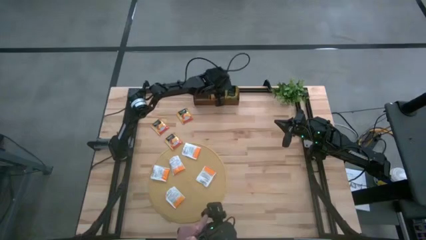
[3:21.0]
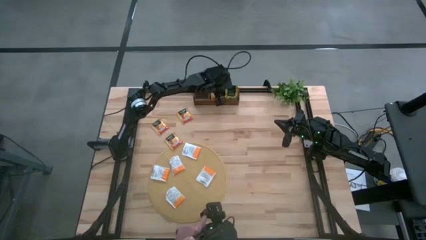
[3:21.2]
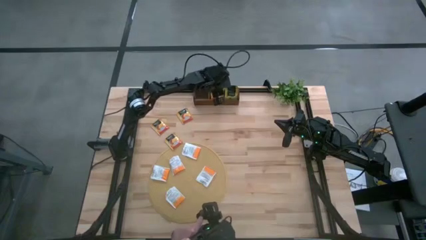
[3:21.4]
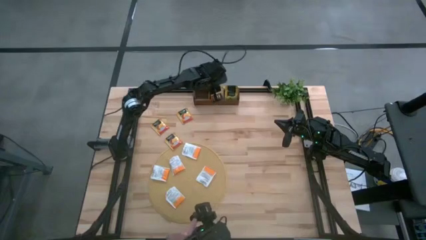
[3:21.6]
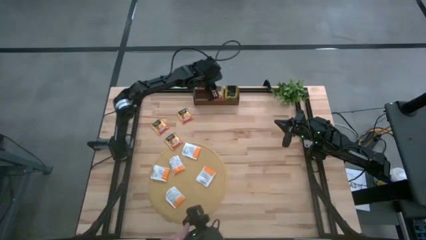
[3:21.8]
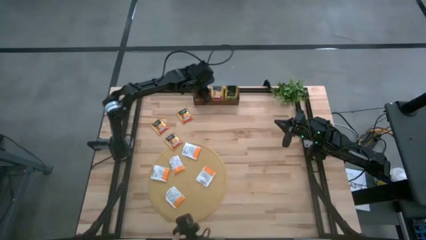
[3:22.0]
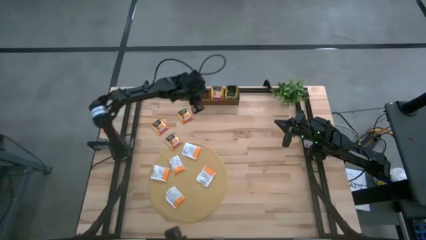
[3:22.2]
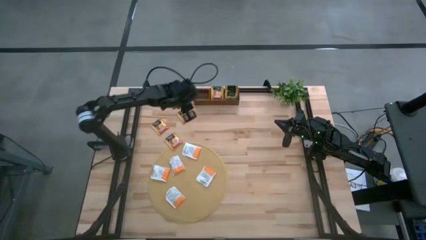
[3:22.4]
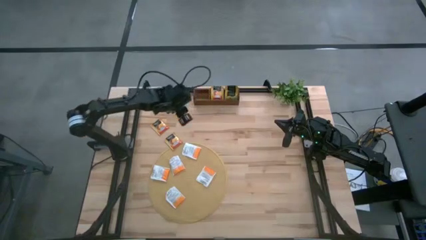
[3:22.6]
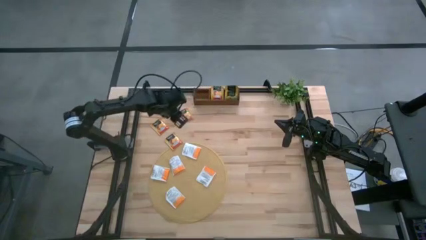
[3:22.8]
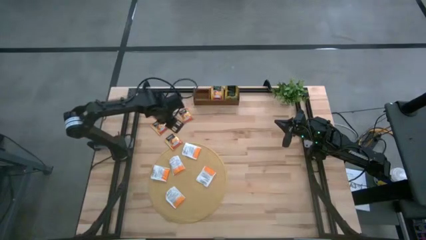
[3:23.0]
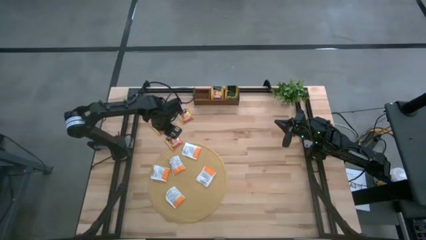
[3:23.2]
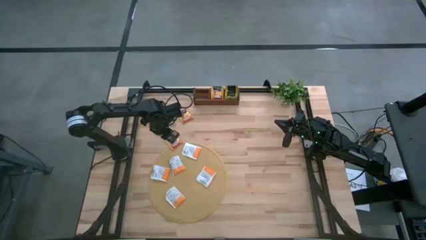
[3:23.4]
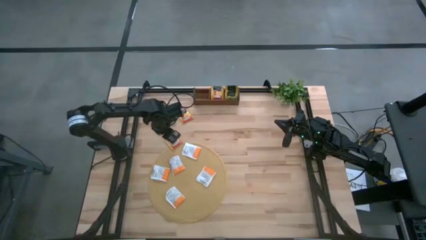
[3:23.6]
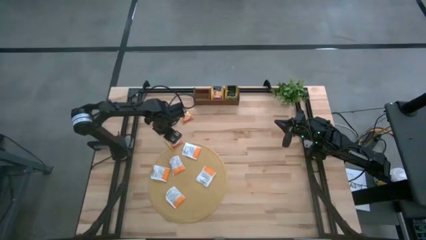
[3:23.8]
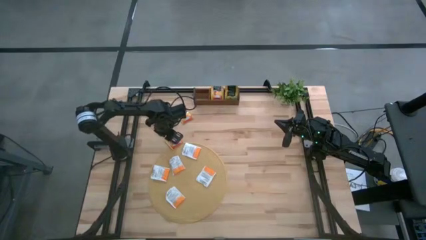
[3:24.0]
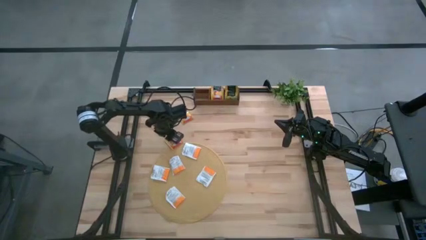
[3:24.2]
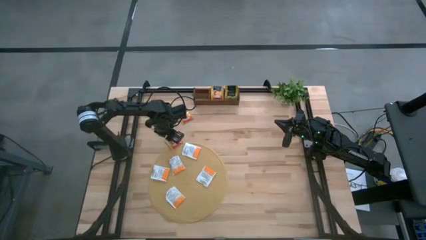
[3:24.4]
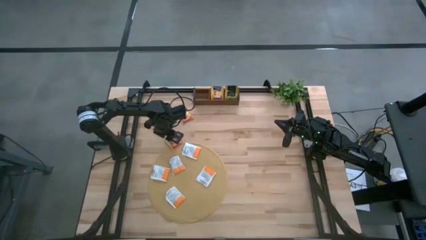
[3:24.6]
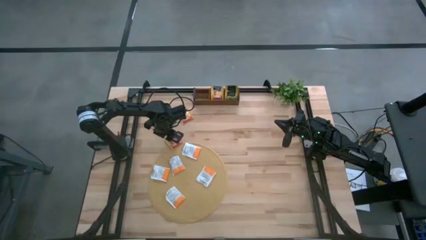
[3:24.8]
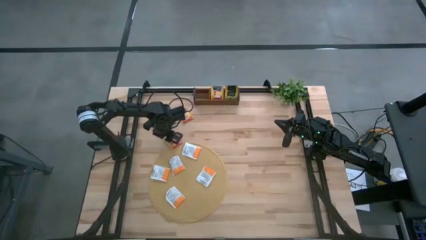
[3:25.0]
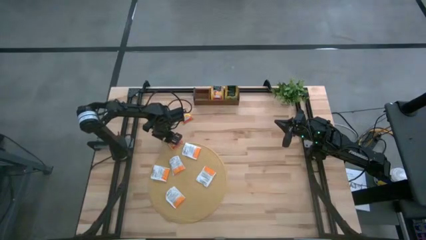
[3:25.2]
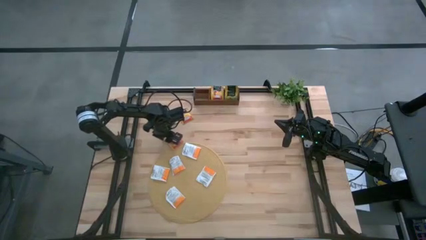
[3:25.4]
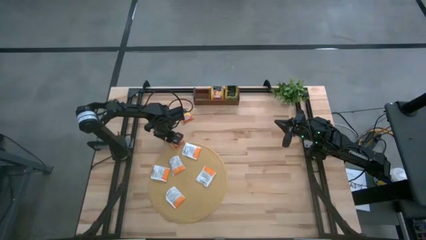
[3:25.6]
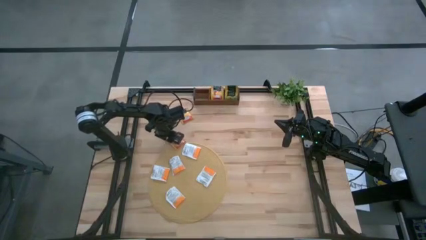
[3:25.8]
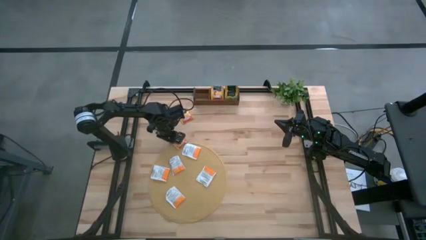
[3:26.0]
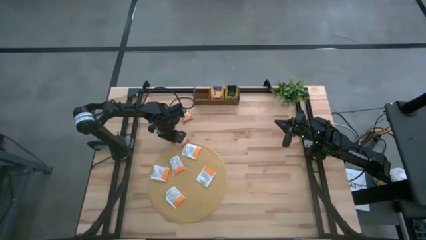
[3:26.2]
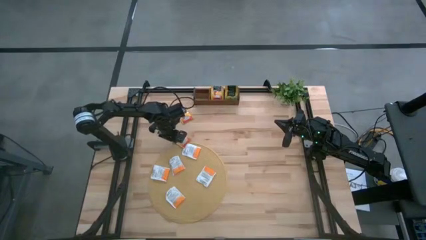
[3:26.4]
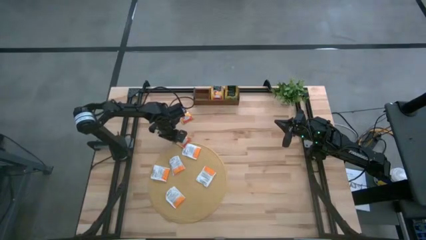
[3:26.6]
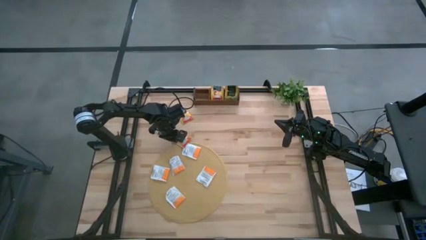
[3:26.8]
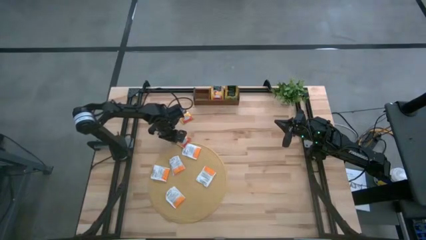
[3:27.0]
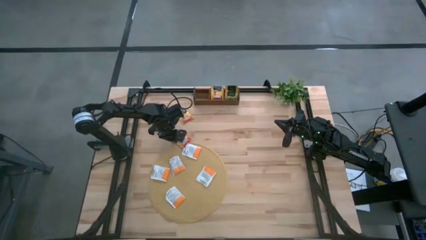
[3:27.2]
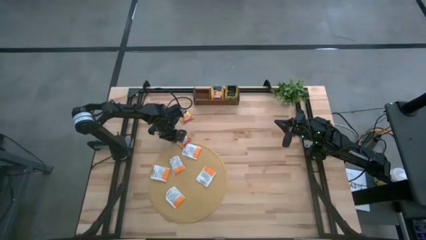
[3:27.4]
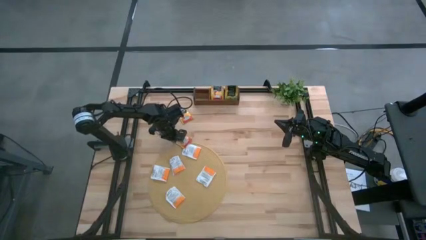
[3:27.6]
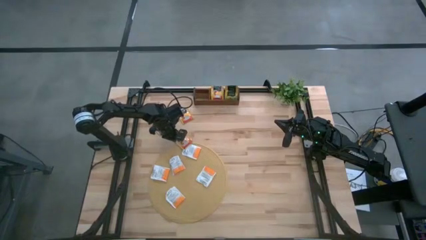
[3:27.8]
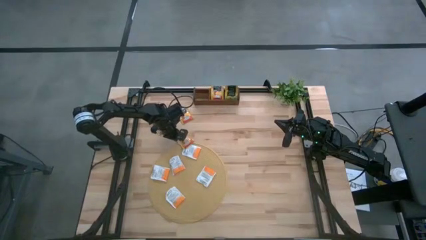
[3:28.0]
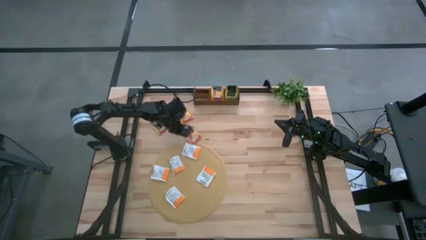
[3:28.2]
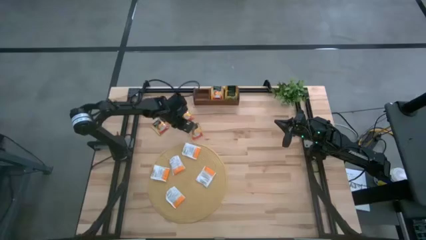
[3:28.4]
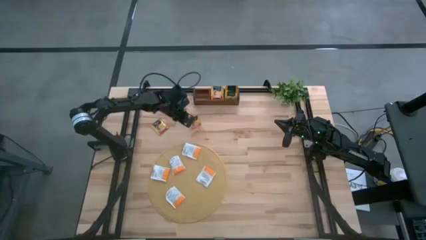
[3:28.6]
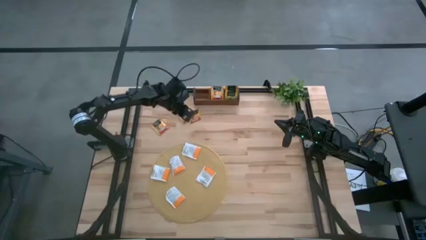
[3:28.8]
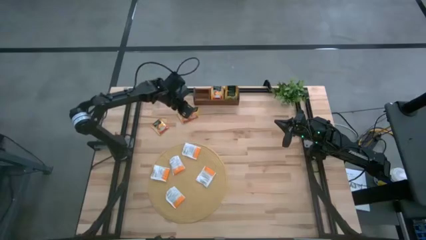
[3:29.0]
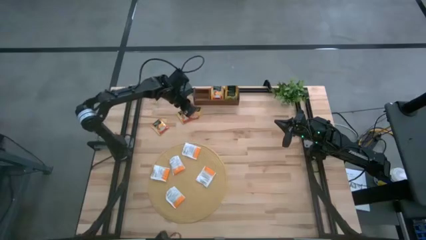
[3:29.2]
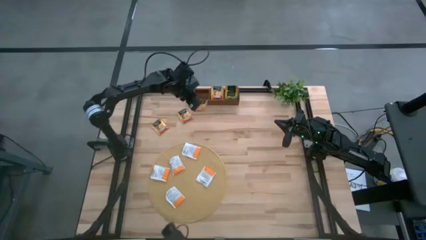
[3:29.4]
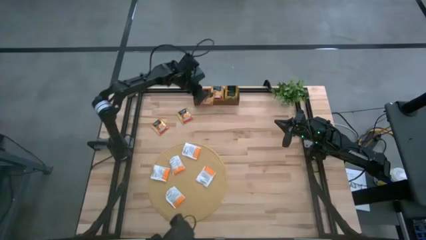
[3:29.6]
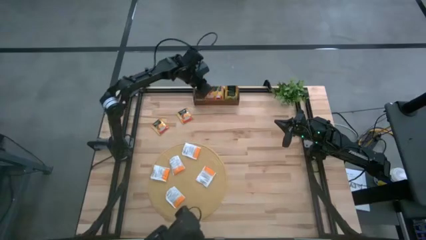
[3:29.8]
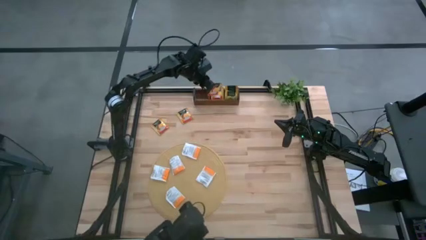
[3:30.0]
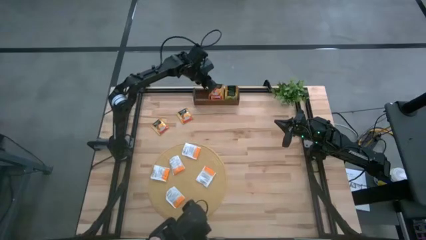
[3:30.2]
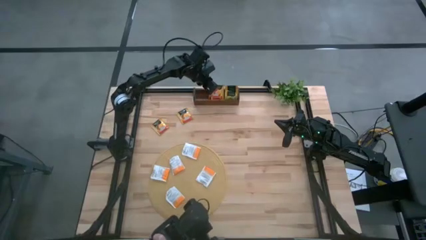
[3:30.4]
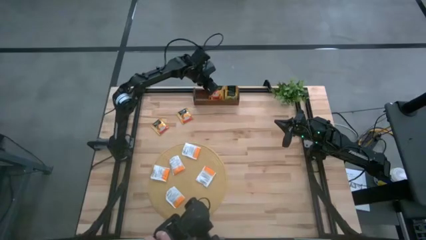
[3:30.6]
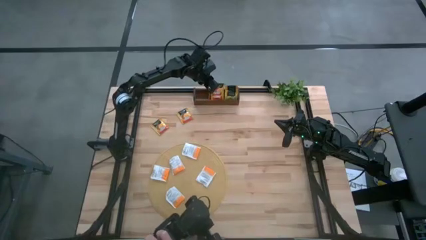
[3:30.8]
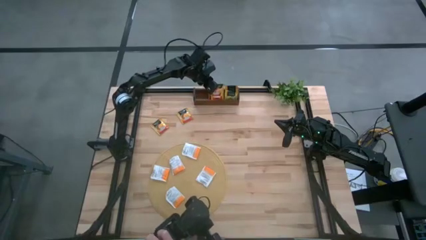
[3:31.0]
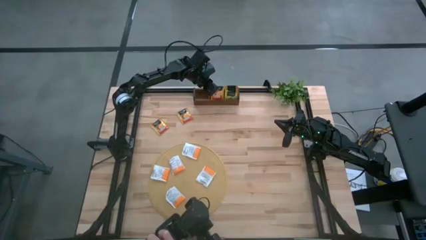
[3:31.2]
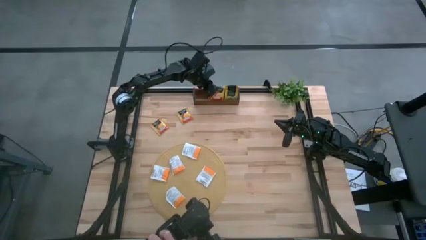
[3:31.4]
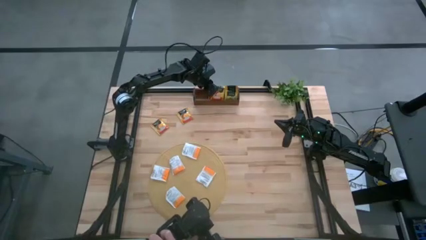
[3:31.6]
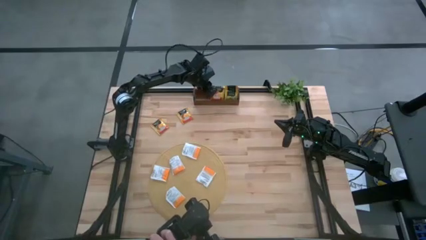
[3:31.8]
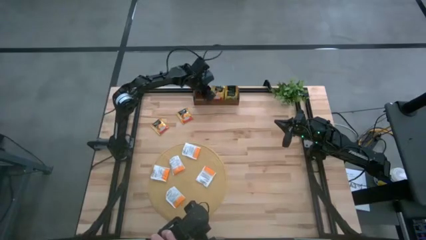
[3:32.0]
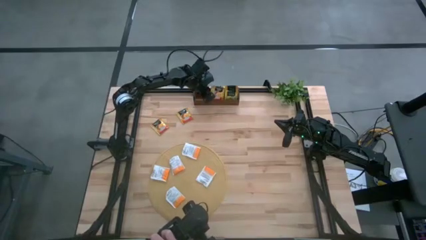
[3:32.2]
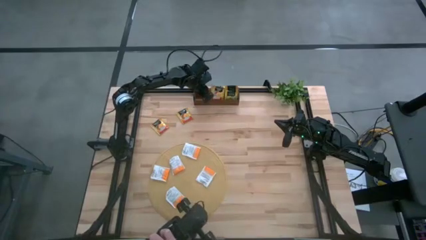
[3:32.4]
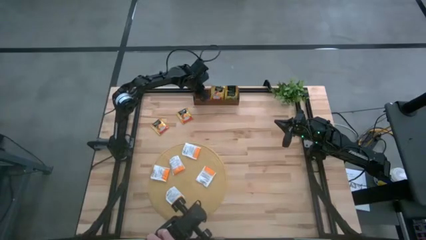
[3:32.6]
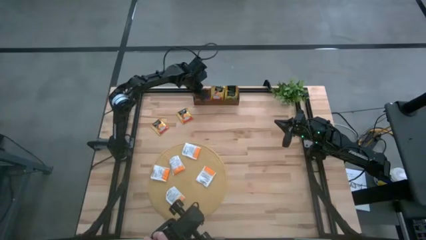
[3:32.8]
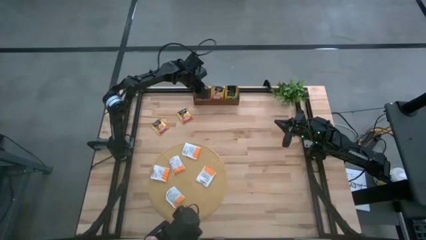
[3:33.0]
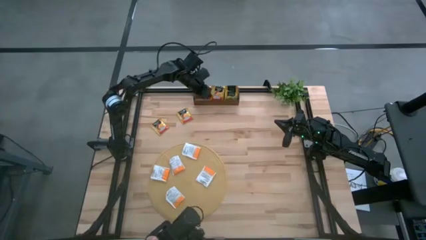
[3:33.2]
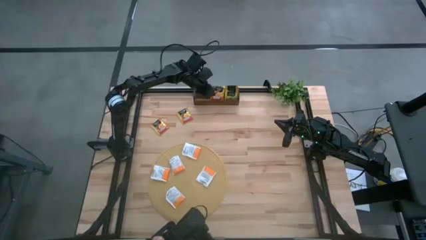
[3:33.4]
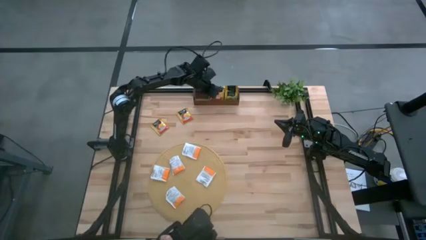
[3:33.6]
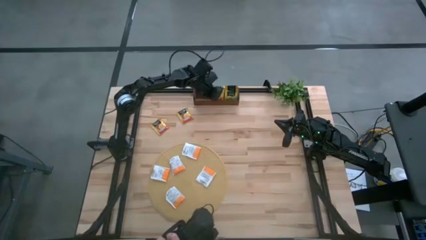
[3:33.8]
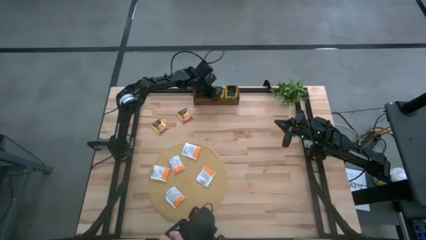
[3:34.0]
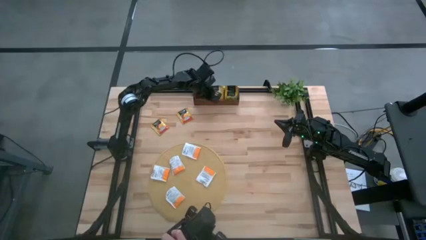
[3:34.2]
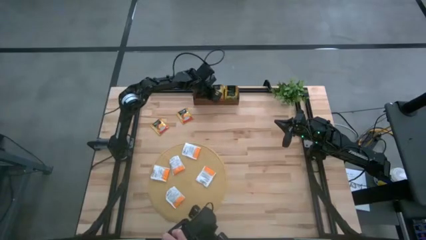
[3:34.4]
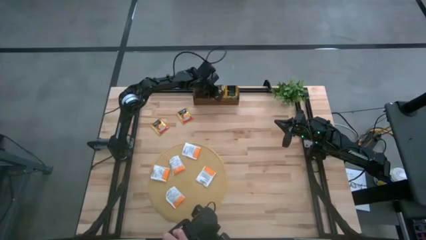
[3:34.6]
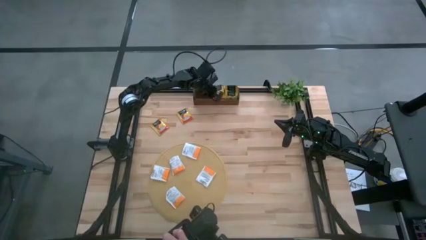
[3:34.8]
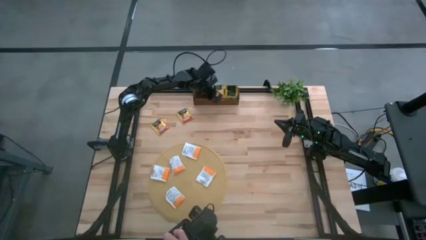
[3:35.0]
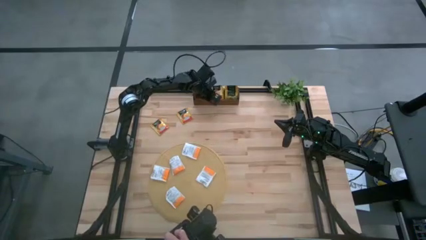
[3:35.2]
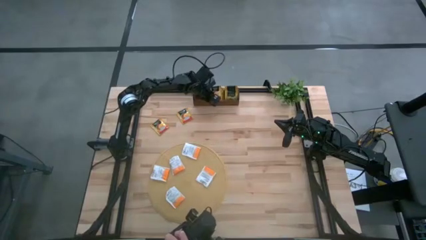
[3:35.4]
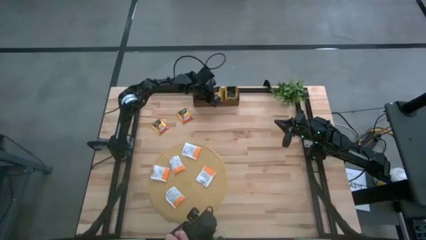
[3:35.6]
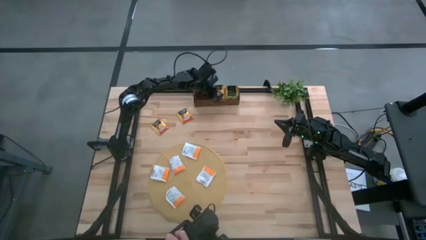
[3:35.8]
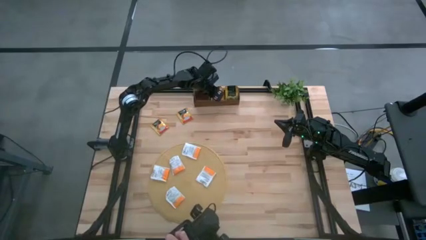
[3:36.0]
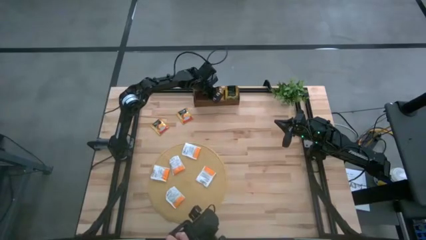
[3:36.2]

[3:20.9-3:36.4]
Task: Pick & Place Tea
Put the bottom left yellow tea bag into the middle slot of the wooden organizer

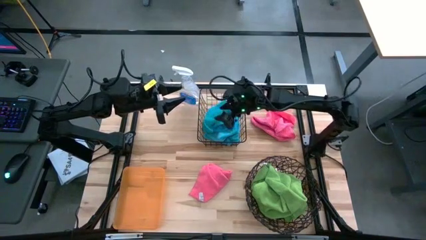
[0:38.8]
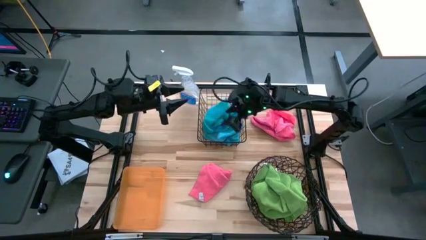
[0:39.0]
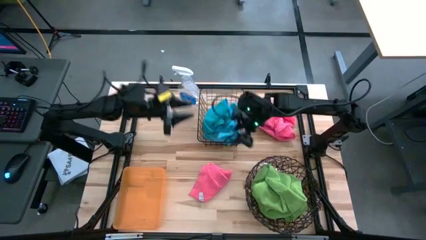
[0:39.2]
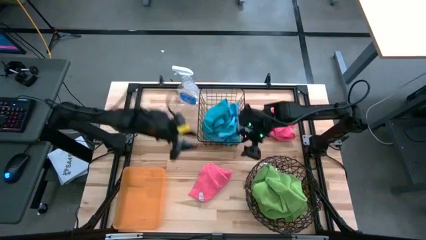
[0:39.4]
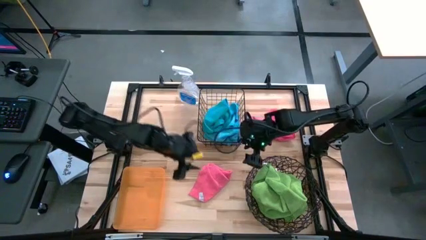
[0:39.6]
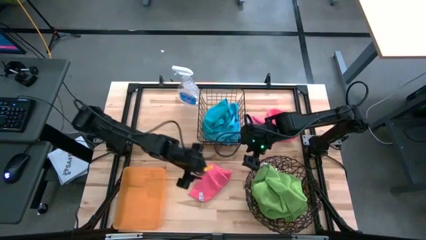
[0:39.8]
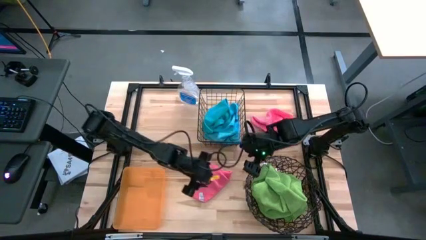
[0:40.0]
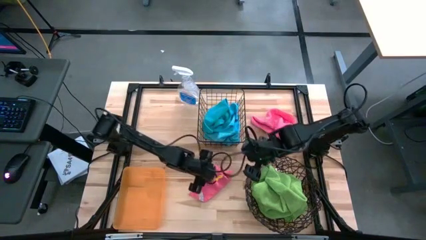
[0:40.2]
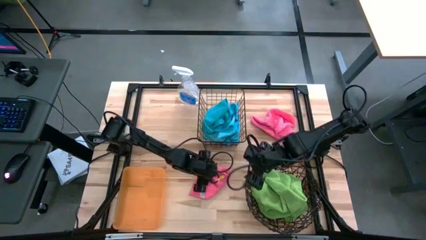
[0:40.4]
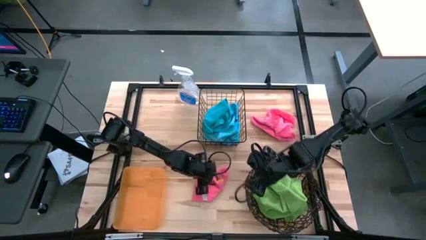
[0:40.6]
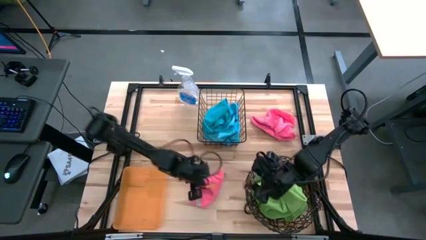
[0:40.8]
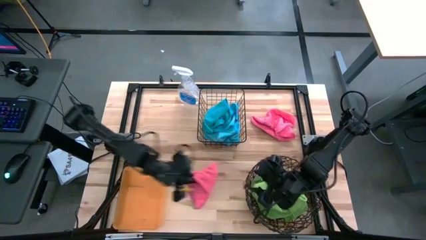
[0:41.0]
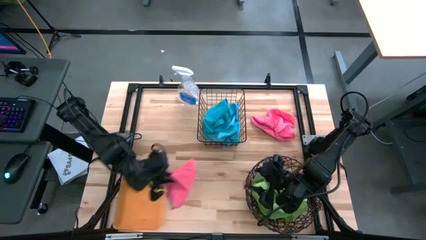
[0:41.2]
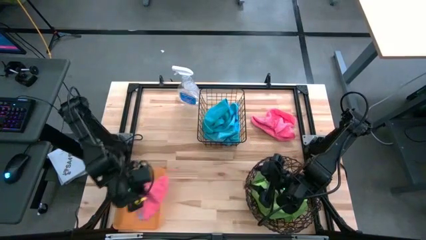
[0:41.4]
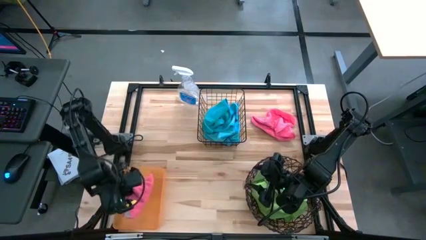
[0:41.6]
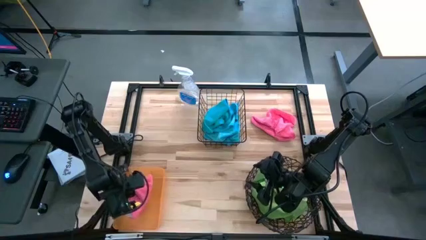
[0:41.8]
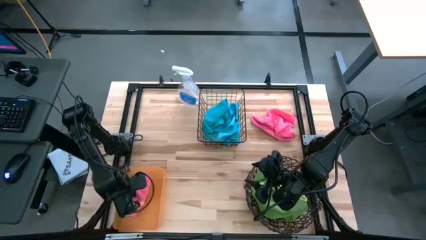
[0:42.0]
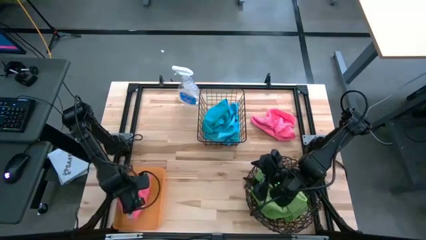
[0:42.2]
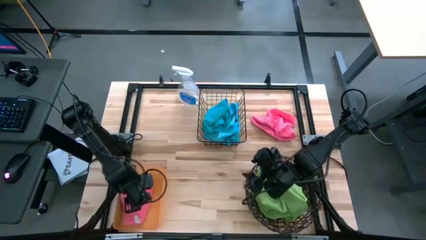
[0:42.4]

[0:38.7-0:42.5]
Task: Sort microfiber towel by color & place in baskets
Put the bottom pink towel into the orange bin
